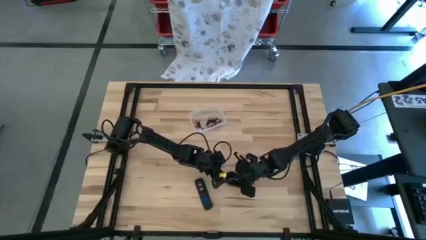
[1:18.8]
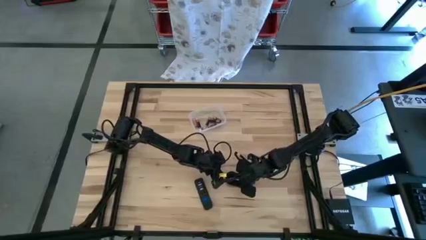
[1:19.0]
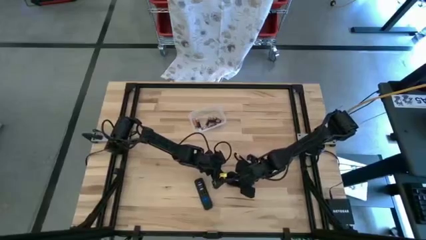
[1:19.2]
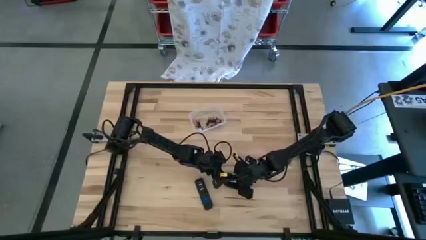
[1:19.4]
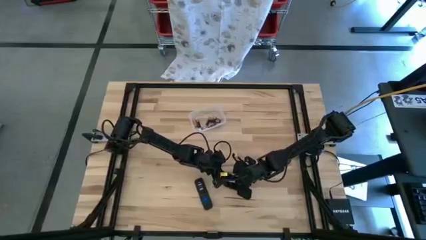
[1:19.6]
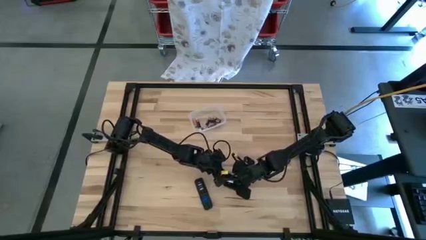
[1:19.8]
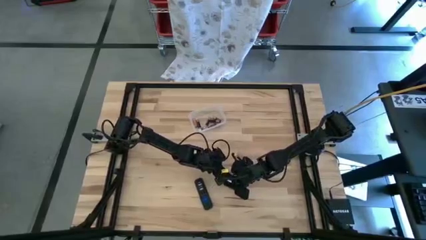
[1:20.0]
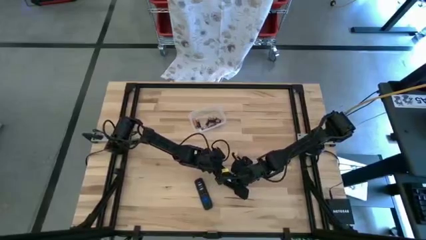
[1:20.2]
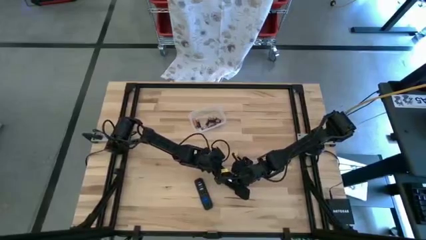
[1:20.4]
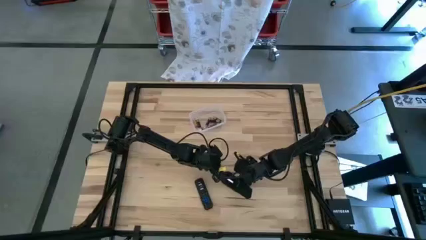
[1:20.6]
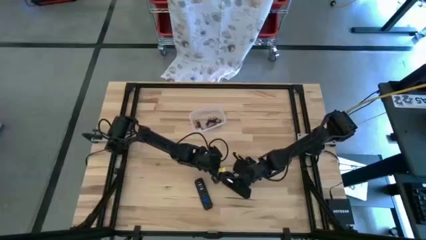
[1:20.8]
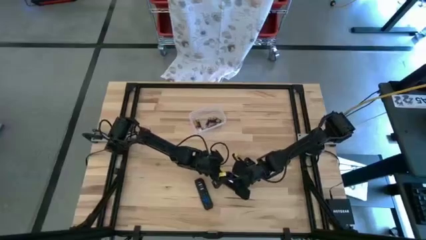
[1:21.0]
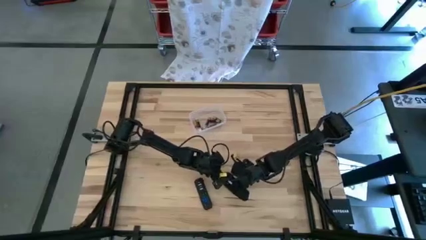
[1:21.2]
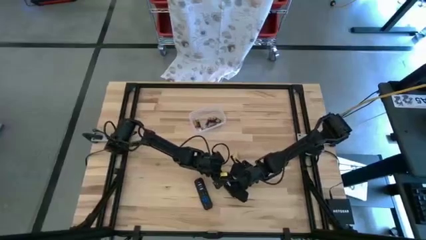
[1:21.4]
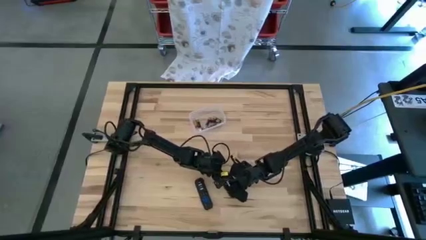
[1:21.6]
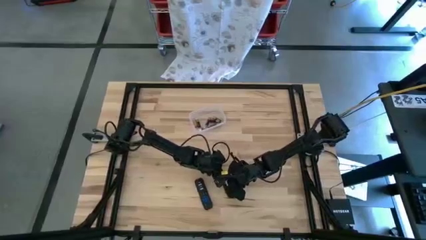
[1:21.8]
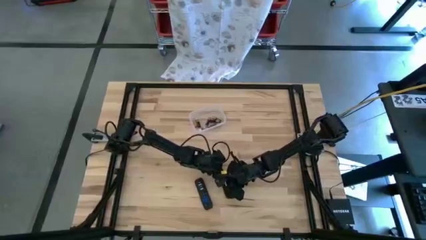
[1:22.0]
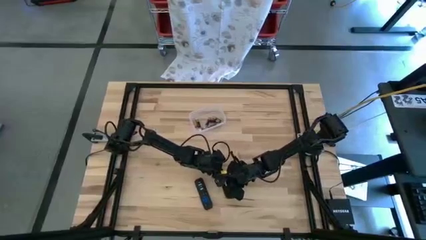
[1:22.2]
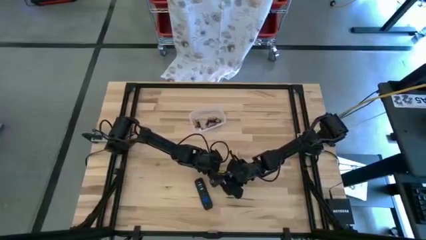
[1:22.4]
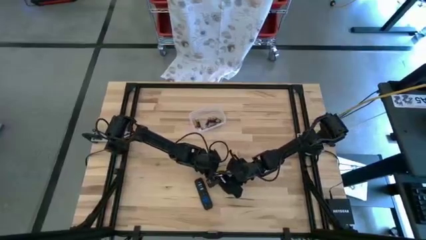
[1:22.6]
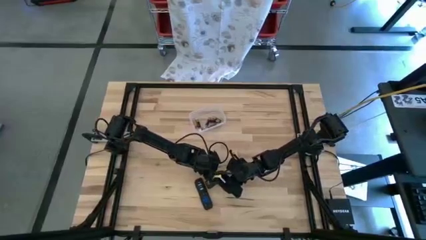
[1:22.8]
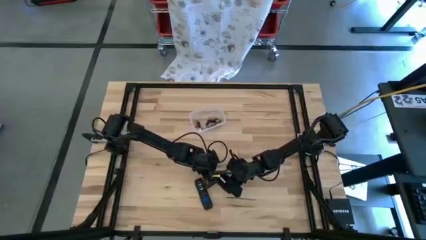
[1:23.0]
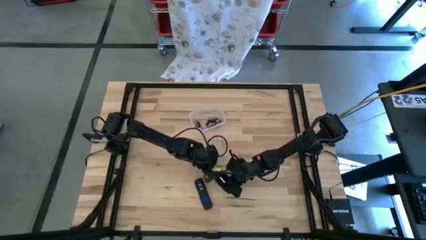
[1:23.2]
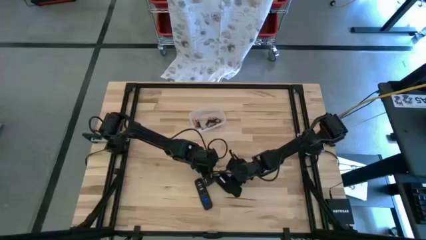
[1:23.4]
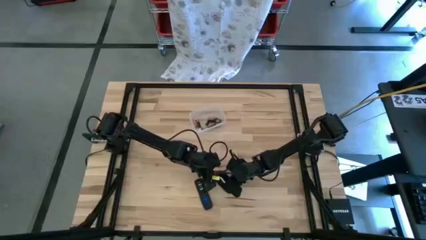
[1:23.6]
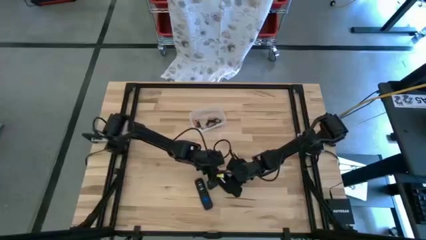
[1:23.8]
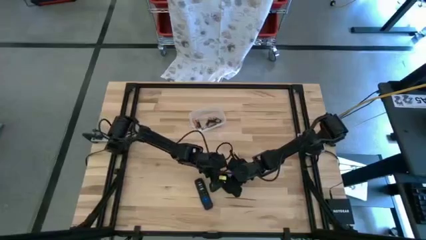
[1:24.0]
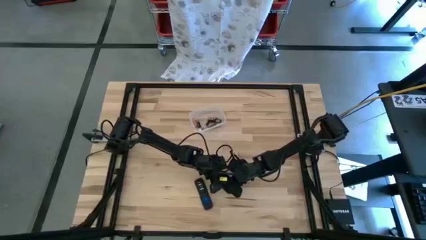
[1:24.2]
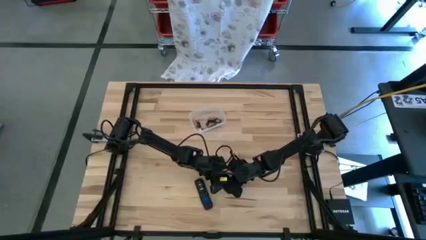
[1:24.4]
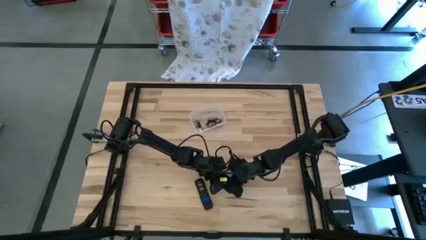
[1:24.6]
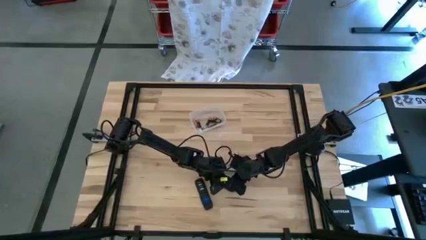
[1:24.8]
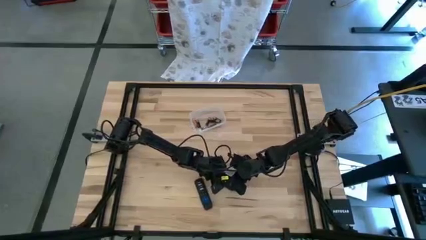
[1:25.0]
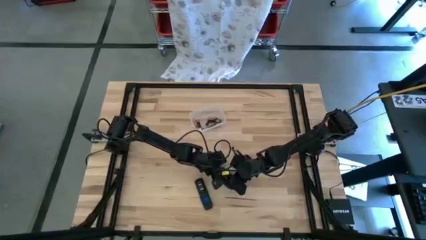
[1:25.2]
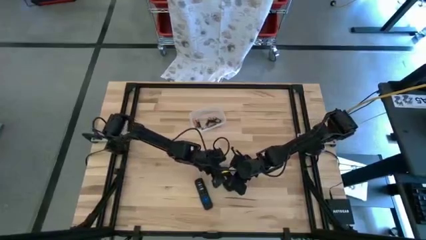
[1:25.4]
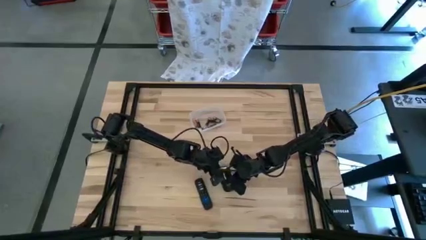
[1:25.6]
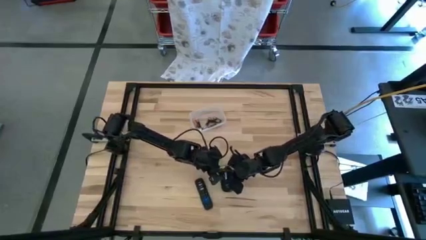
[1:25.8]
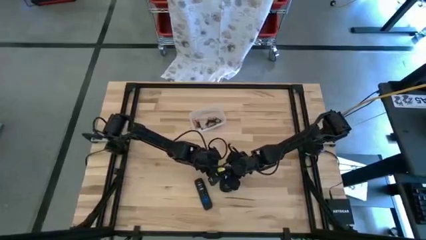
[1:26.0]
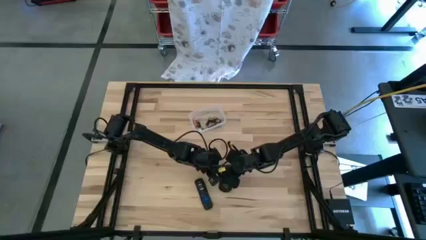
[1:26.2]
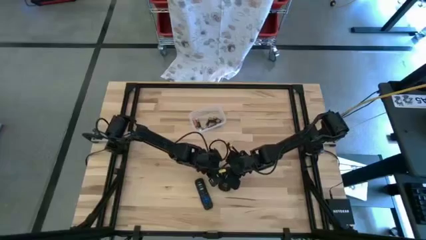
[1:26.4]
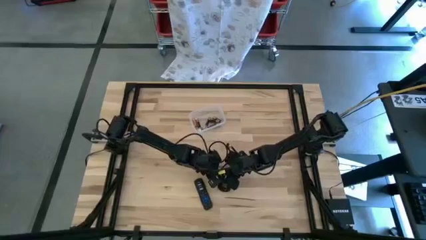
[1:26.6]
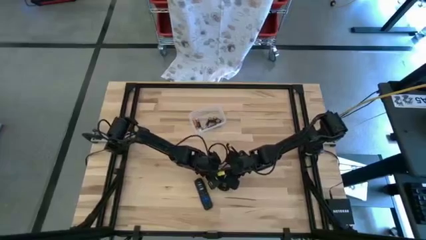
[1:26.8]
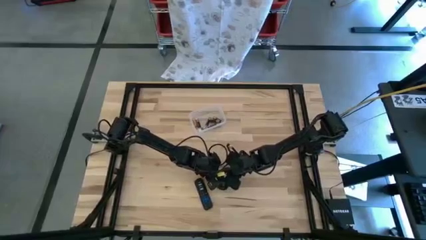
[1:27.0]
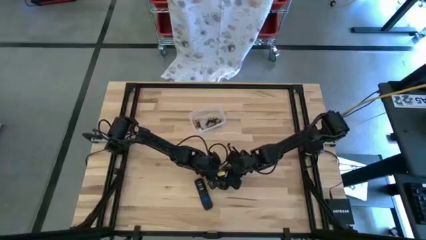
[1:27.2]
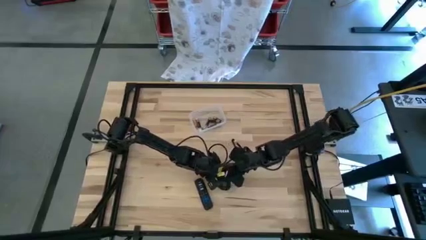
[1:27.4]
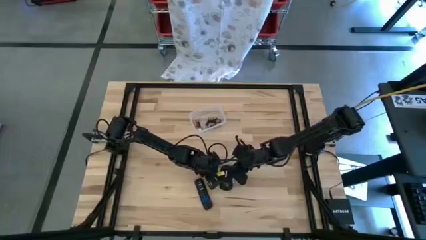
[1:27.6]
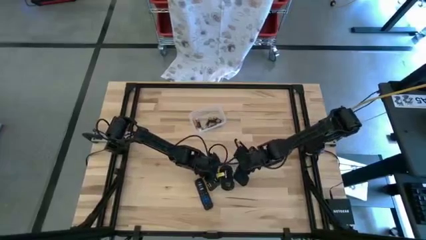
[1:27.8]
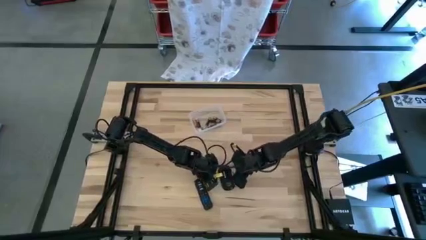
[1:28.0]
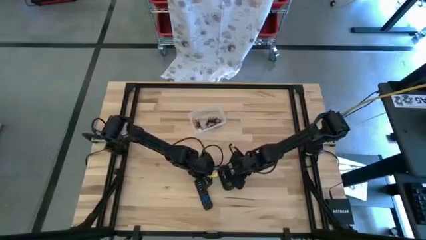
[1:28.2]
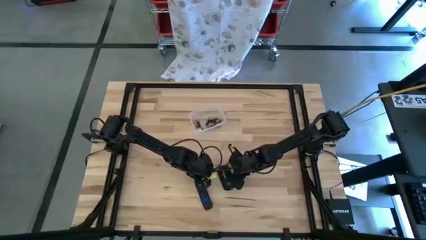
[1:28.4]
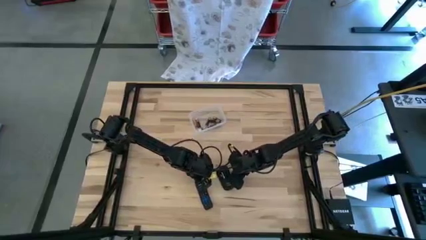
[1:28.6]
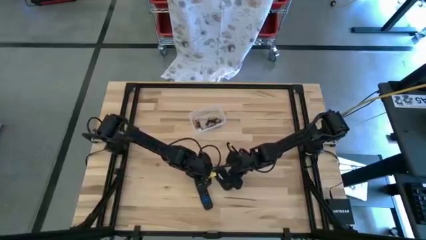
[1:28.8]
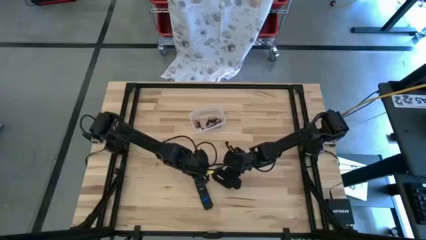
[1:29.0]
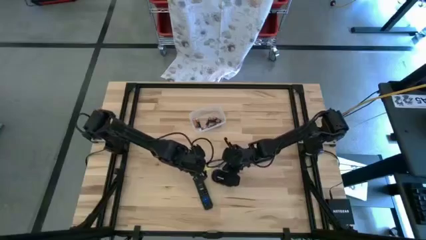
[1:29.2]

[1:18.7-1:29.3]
Task: Insert battery
Insert the silver battery into the mouse

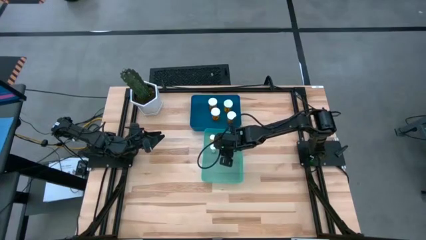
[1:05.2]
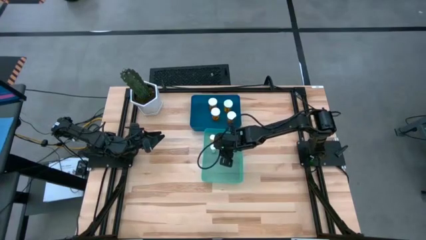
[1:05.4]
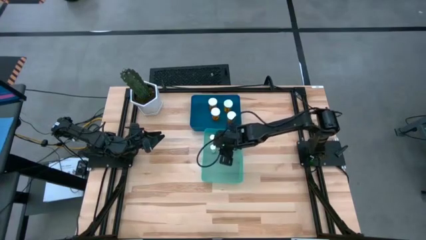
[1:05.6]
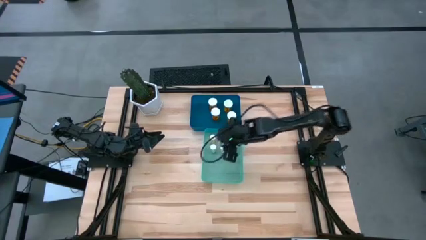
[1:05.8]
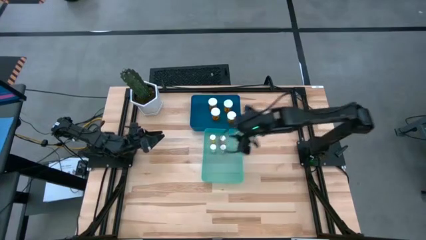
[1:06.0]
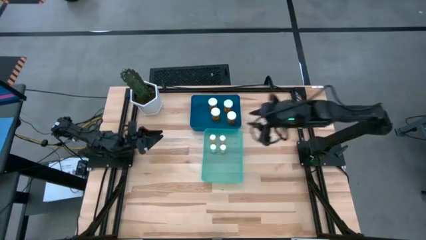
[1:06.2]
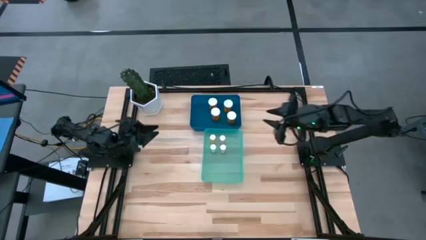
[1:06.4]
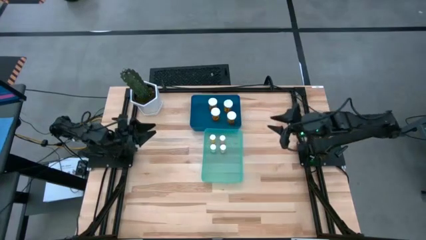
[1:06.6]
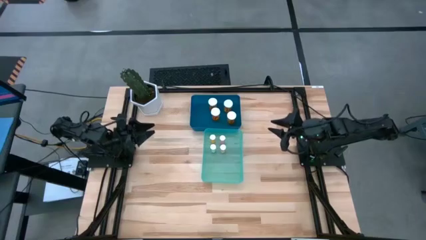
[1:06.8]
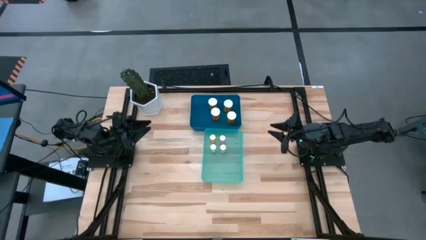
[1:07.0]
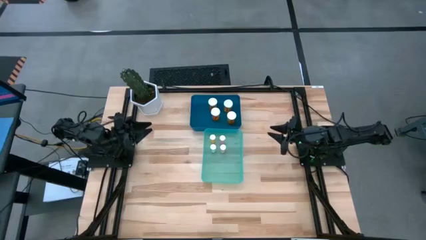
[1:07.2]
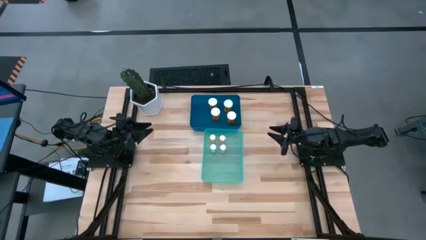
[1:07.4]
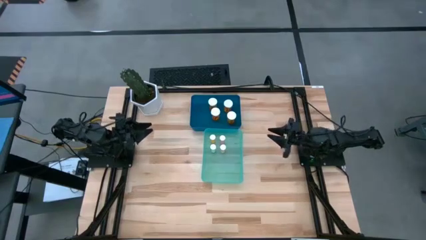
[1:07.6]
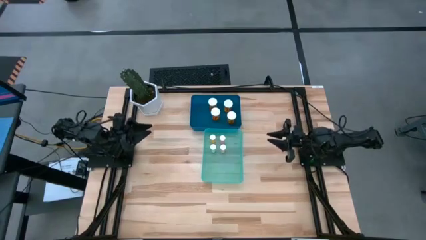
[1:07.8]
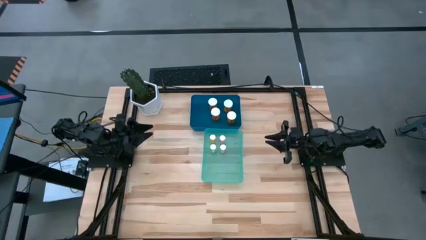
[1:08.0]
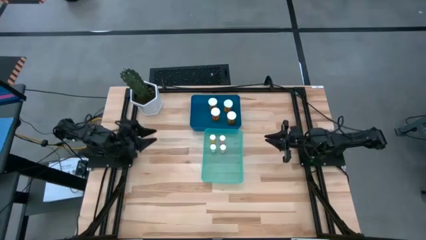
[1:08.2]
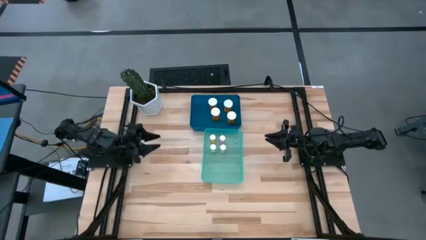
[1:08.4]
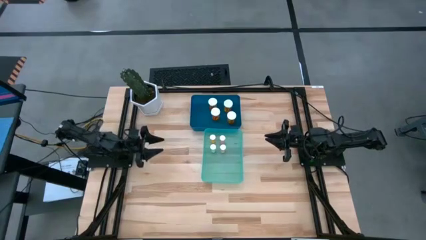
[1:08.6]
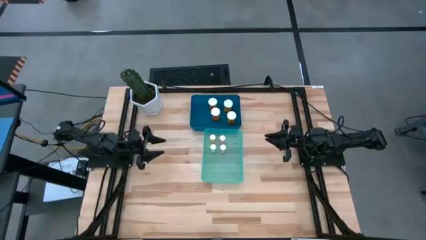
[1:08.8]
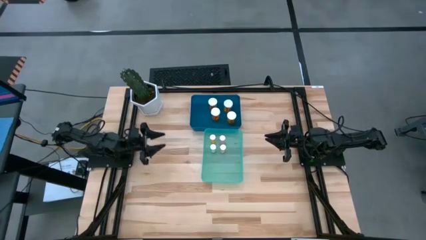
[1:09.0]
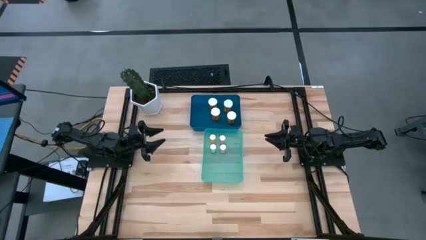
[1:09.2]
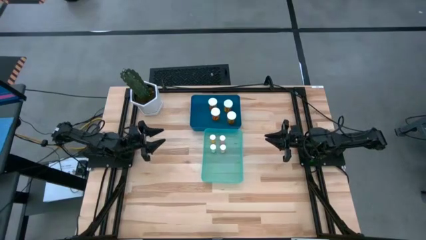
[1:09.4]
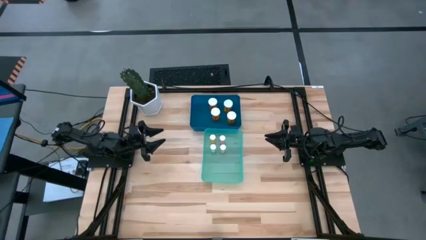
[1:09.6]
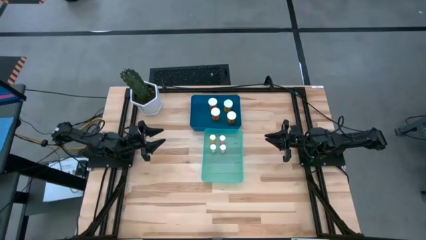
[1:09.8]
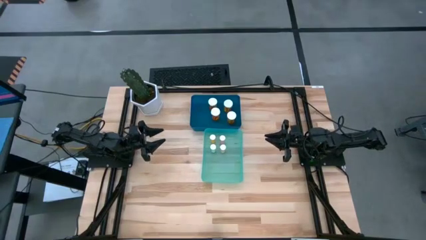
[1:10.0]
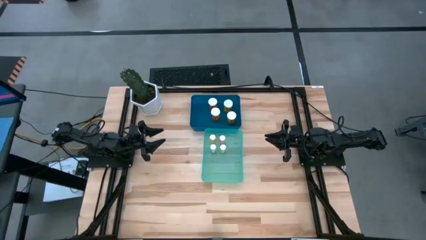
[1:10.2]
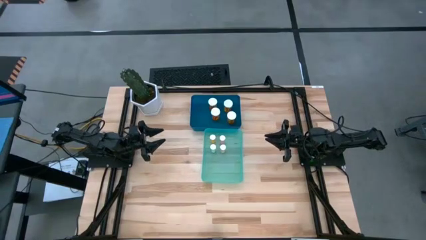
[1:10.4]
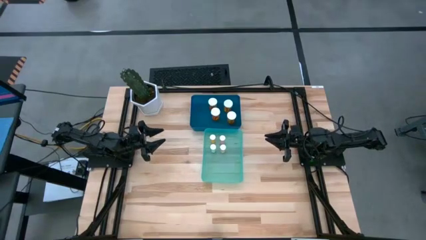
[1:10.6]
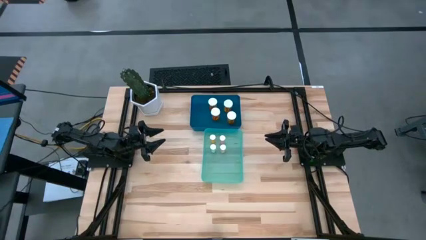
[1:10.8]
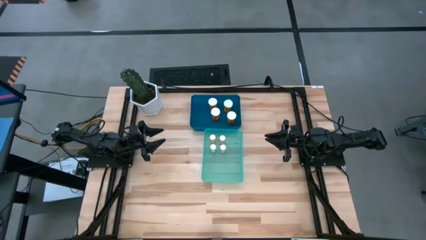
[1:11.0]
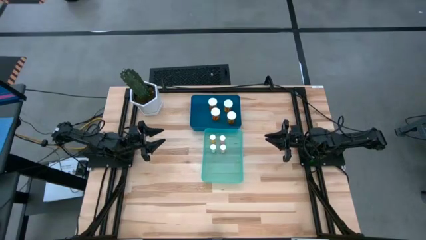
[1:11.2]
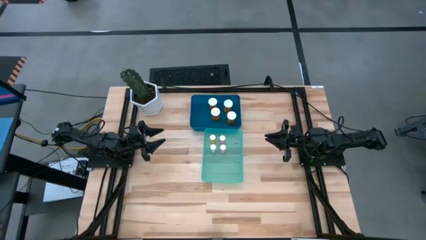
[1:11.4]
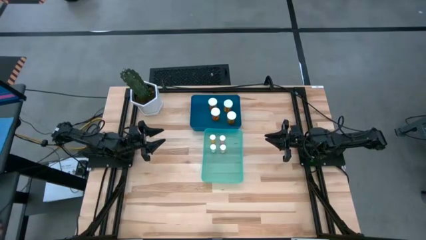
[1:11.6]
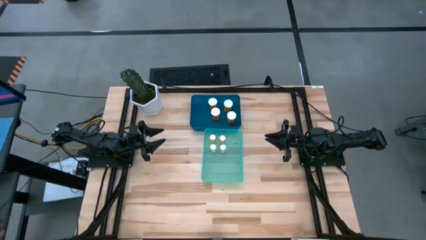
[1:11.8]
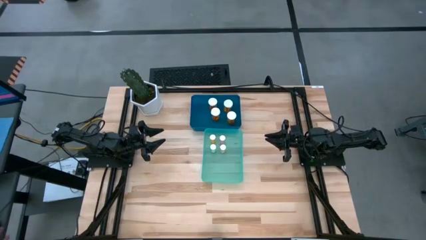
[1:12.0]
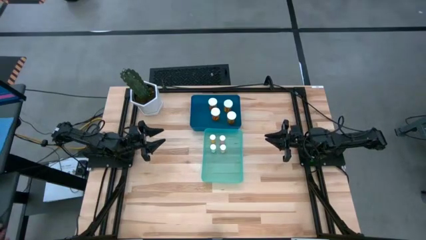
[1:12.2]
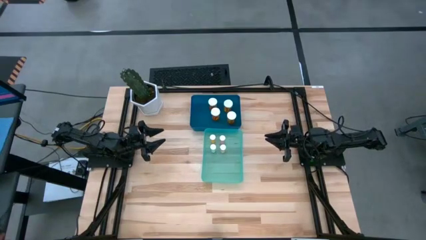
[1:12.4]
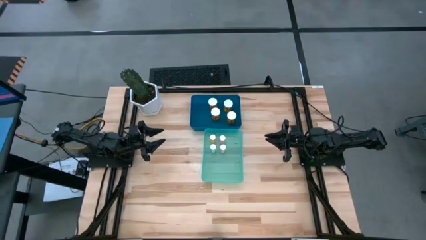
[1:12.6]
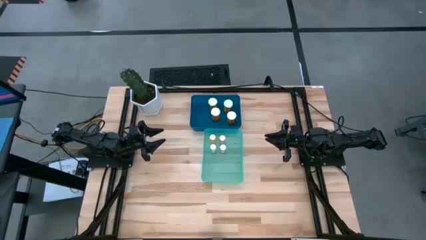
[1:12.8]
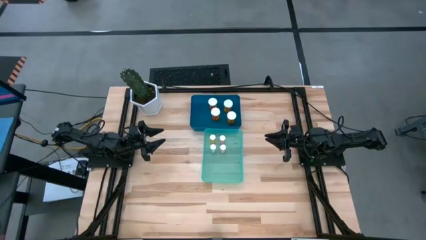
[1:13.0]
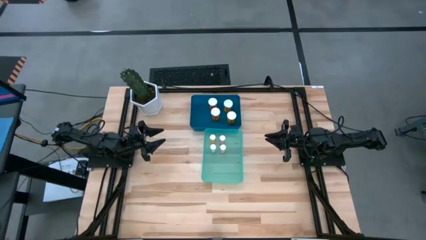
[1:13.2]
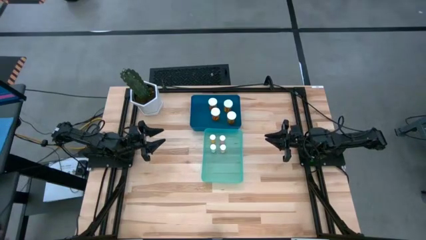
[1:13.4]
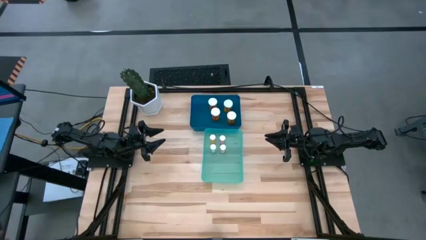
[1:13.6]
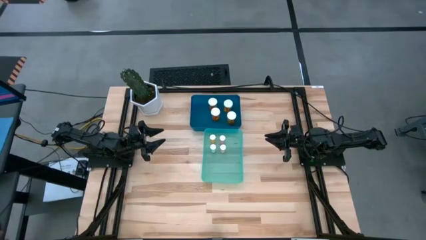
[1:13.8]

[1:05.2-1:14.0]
Task: Pick and place medicine bottles into bin by pill shape (circle, oval)
Return to Home Position
